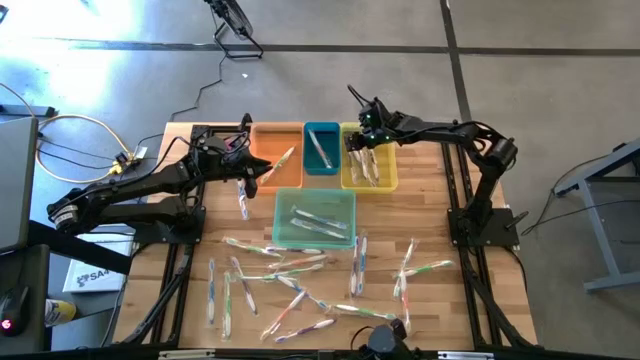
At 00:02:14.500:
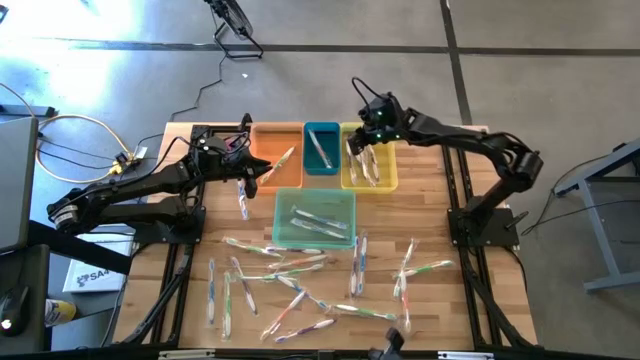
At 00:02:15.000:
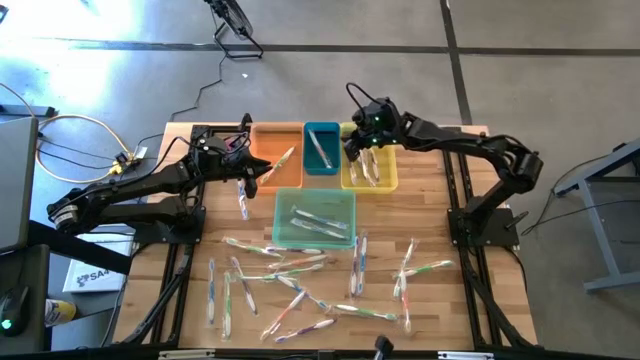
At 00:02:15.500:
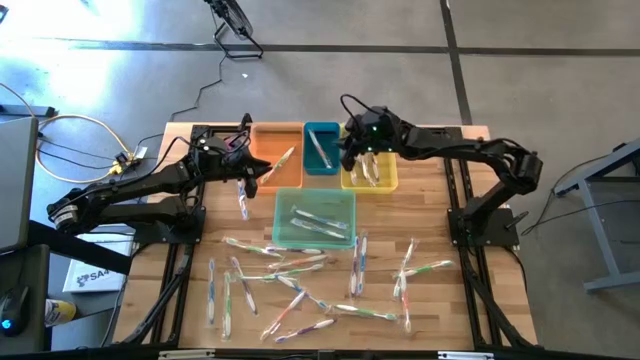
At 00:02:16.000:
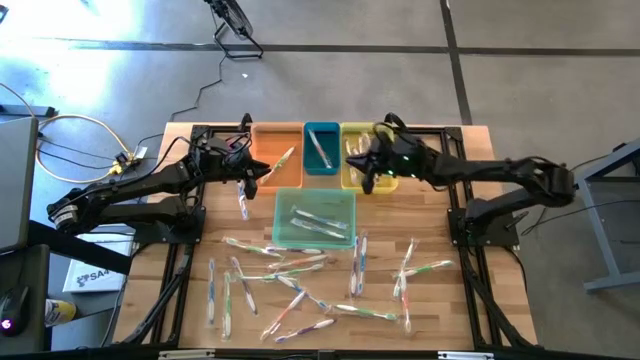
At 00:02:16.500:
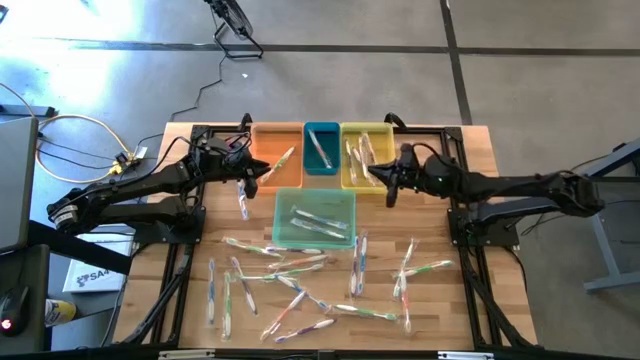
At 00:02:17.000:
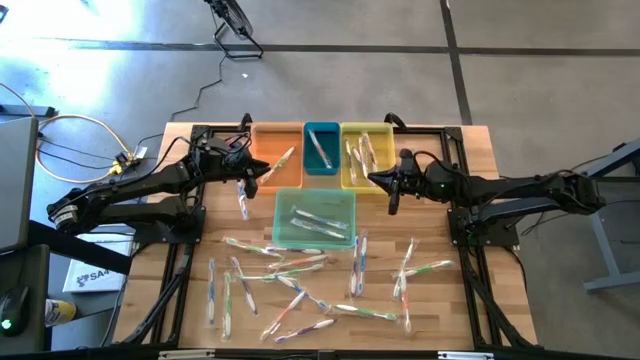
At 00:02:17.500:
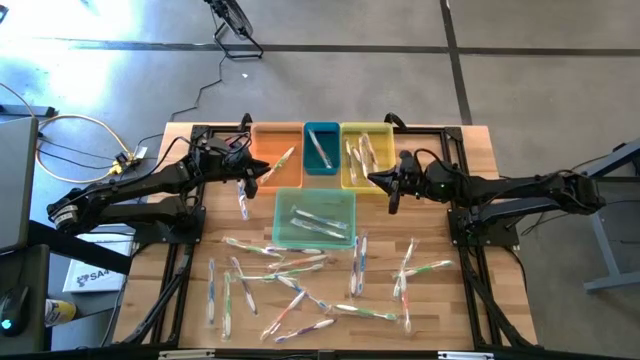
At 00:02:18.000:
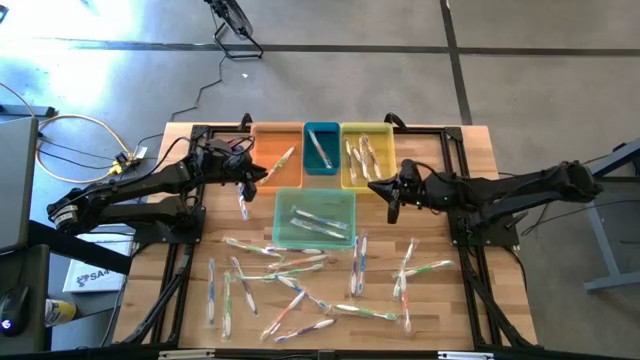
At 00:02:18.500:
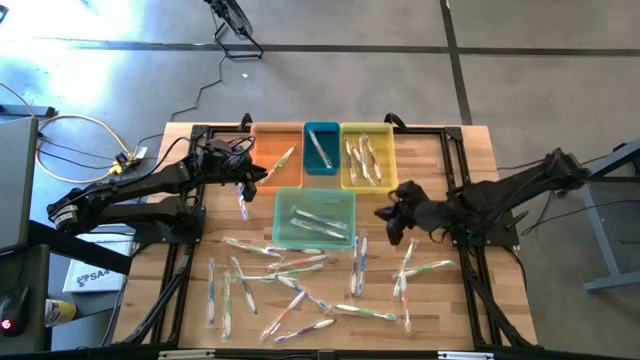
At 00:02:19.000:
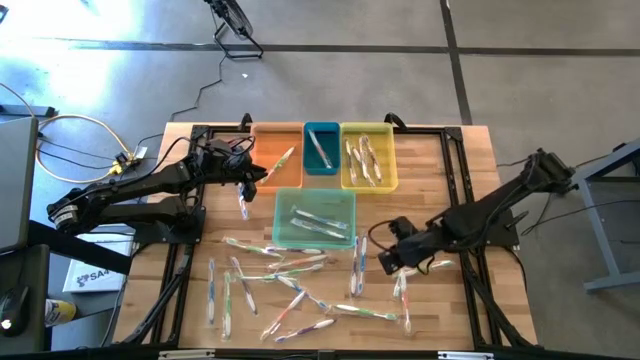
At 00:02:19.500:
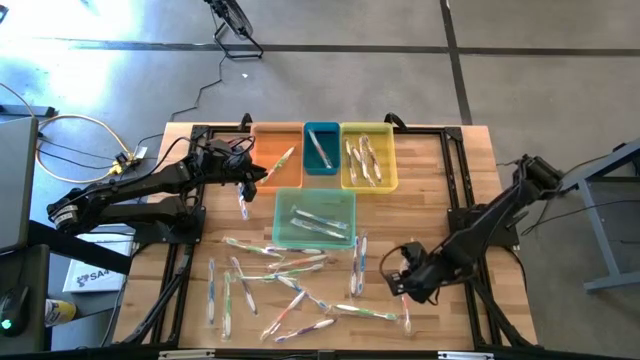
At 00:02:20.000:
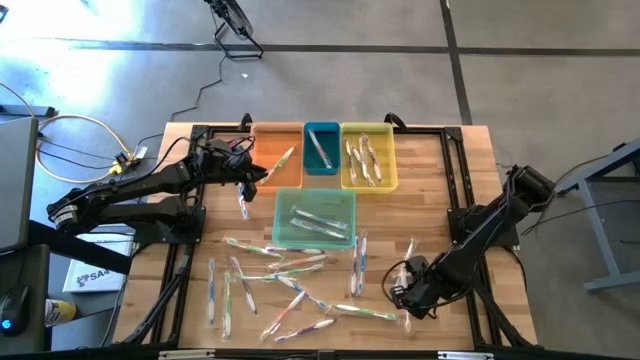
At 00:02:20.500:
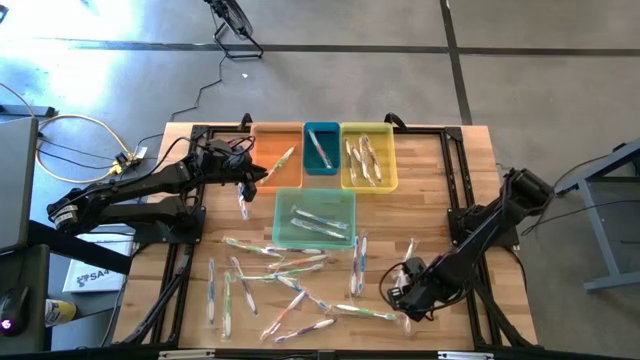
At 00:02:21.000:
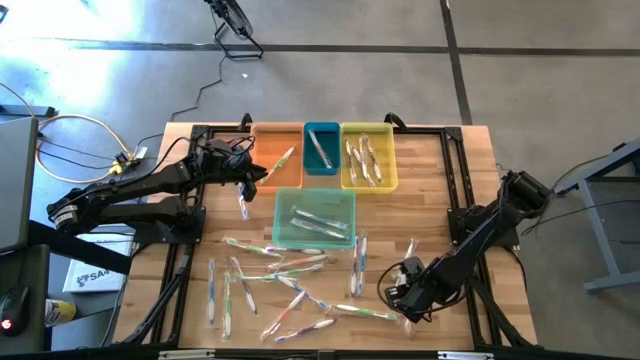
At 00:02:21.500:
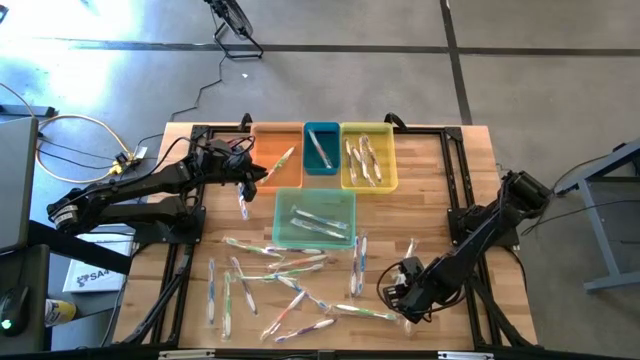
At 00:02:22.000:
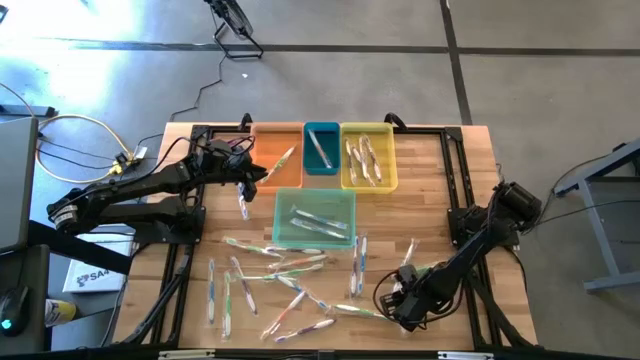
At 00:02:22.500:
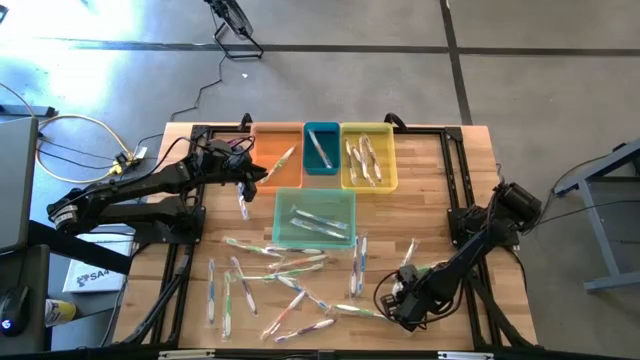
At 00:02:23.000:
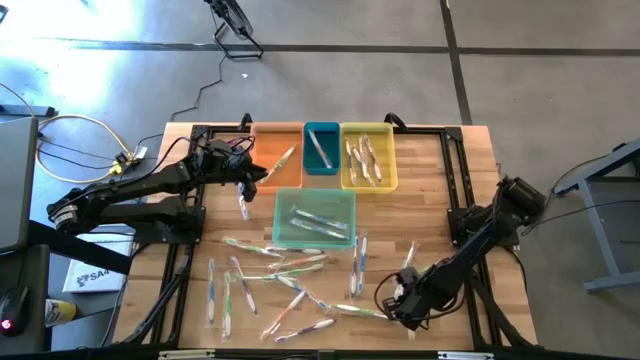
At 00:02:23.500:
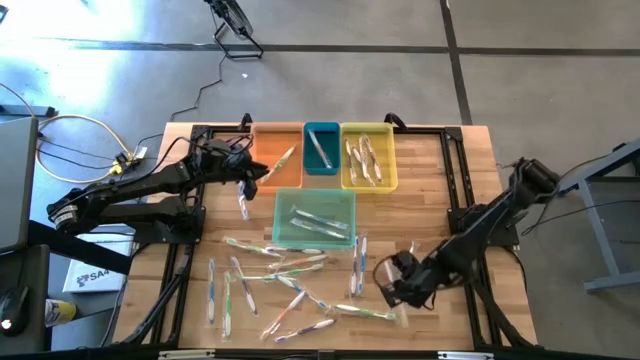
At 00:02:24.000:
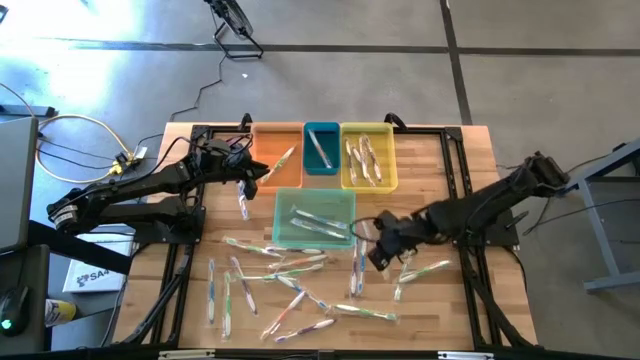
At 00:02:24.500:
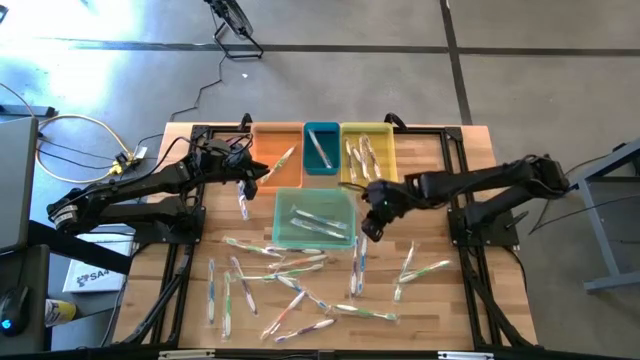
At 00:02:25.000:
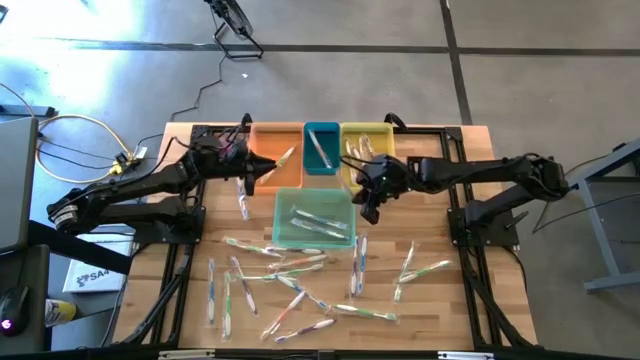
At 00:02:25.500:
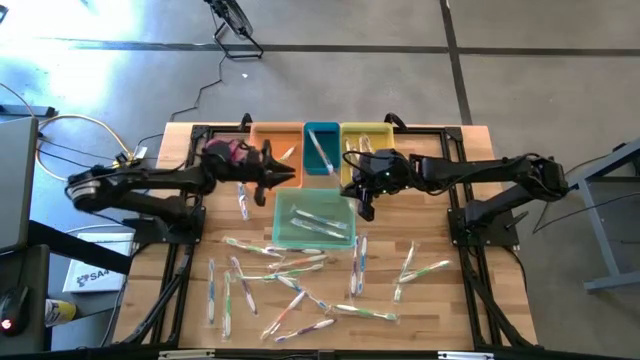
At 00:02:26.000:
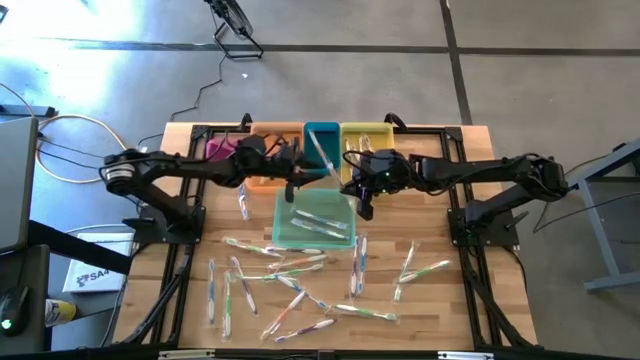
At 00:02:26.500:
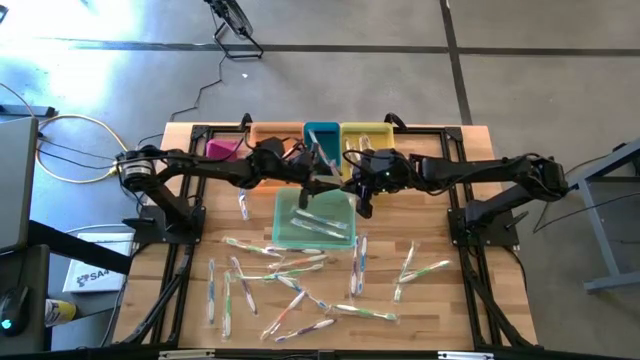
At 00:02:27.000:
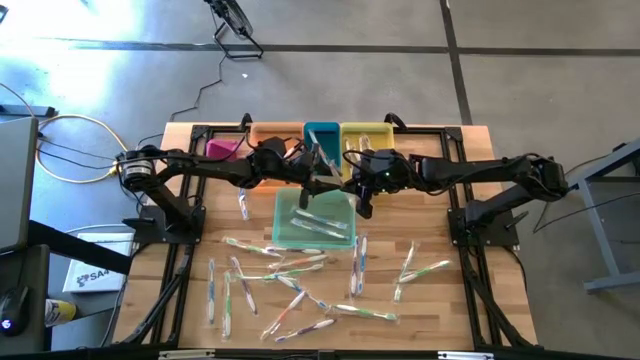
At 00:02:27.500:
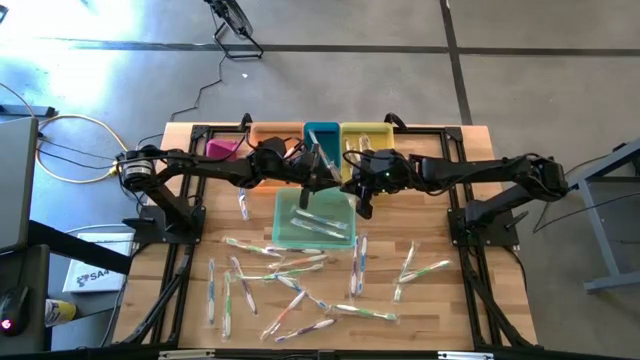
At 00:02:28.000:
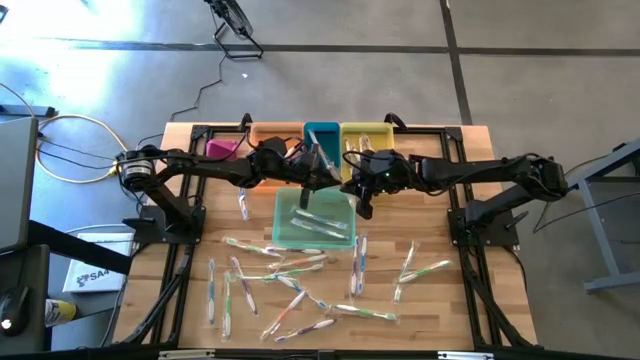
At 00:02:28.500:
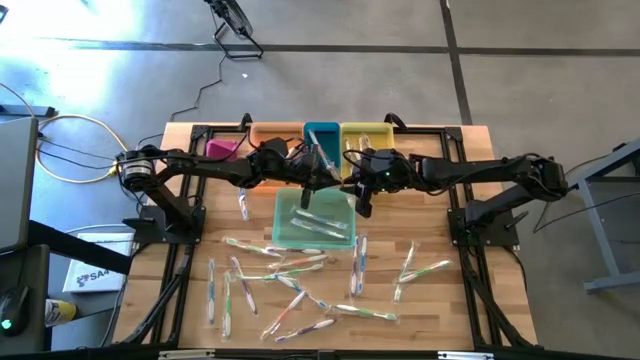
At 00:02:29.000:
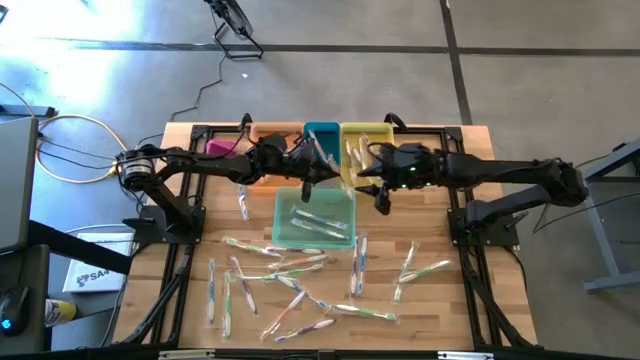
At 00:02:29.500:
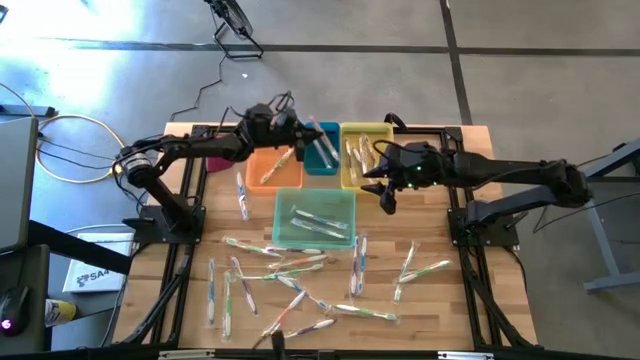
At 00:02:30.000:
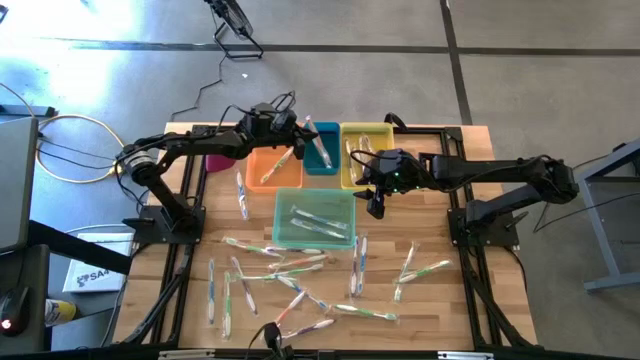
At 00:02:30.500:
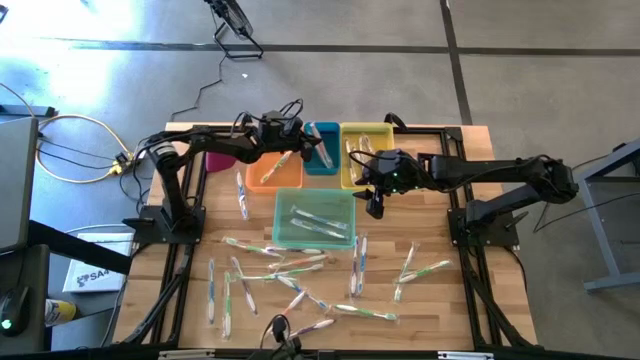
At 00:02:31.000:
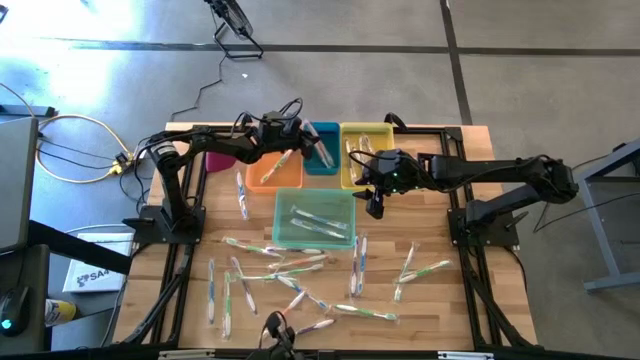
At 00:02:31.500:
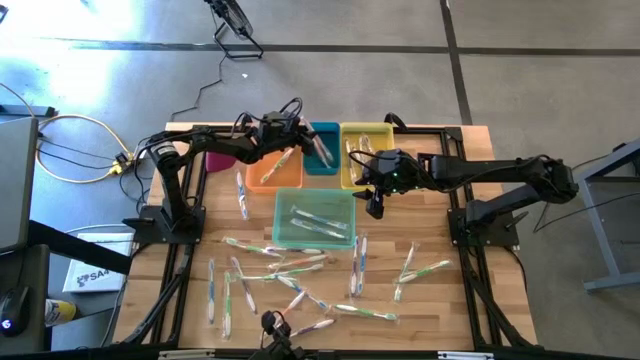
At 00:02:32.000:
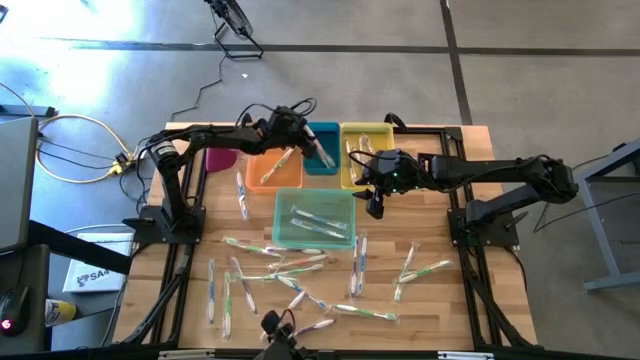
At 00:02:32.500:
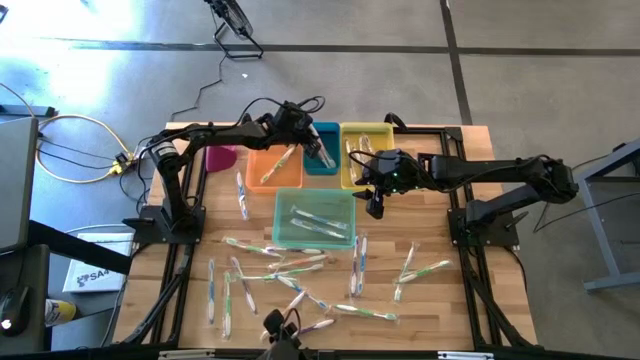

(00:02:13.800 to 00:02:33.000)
Task: Pick & Place Toothbrushes
Put the orange toothbrush into the blue bin
